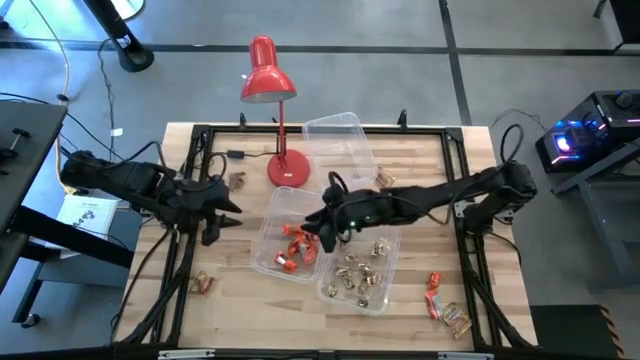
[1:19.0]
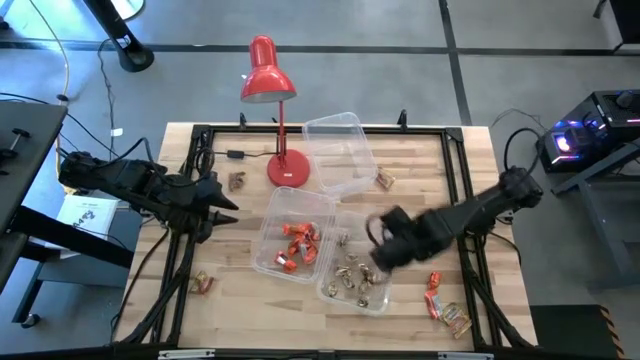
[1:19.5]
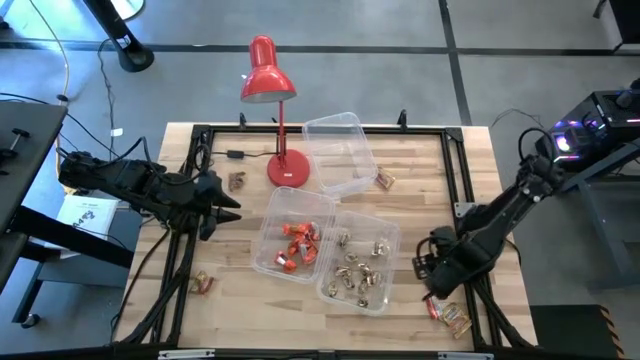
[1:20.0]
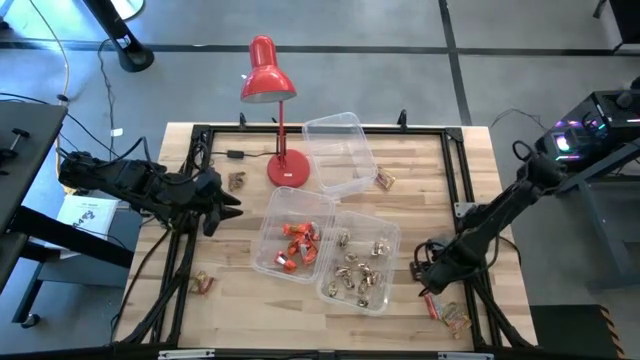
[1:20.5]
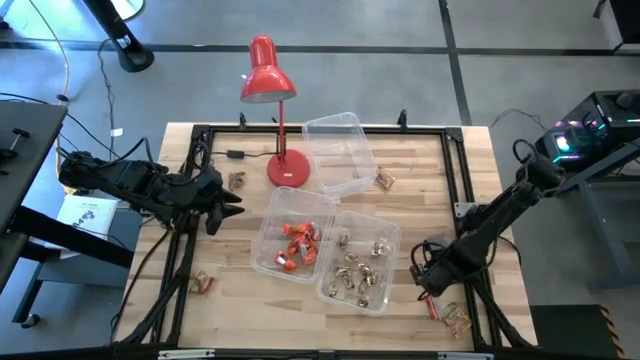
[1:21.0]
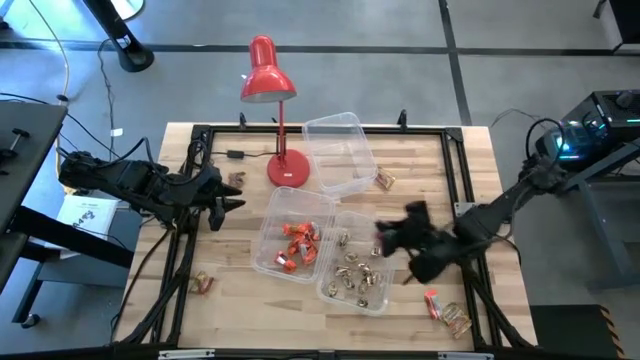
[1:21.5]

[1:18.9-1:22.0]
Task: Sort candy
Put the orange chocolate bar into the bottom left transparent bin

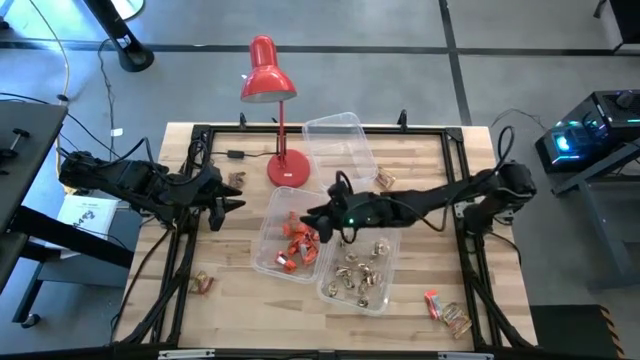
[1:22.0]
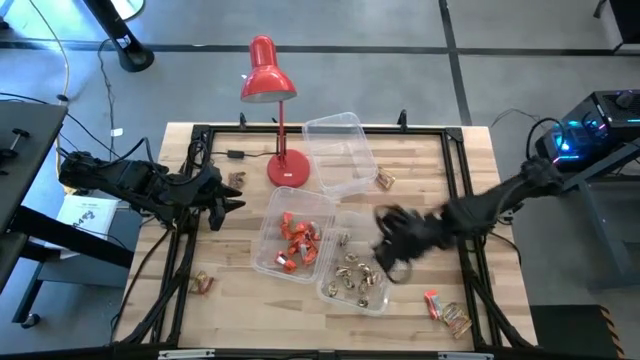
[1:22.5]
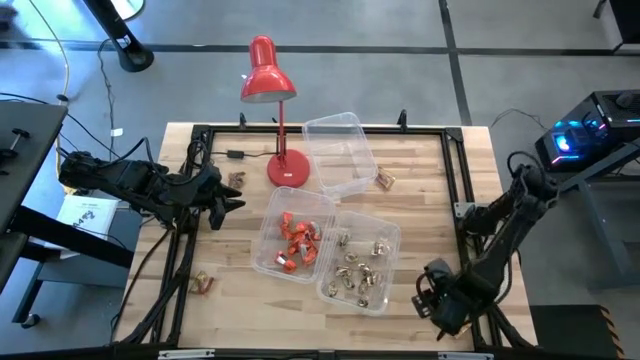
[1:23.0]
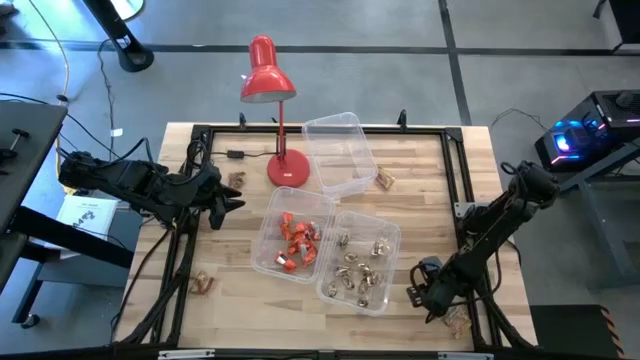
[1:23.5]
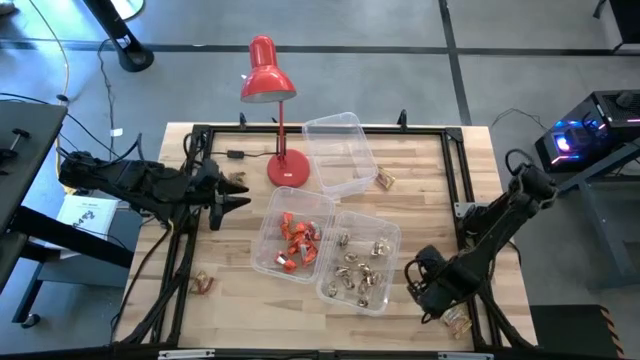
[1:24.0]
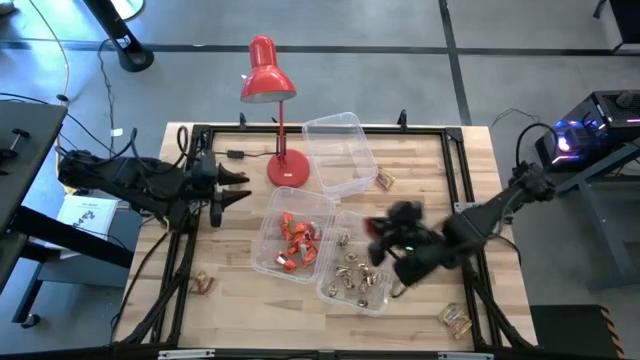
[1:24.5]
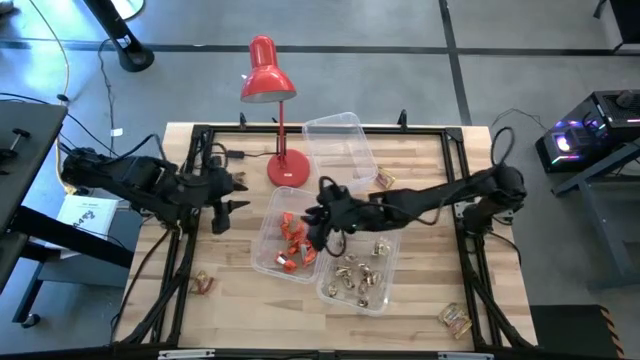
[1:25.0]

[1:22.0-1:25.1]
Put the orange chocolate bar into the bottom left transparent bin

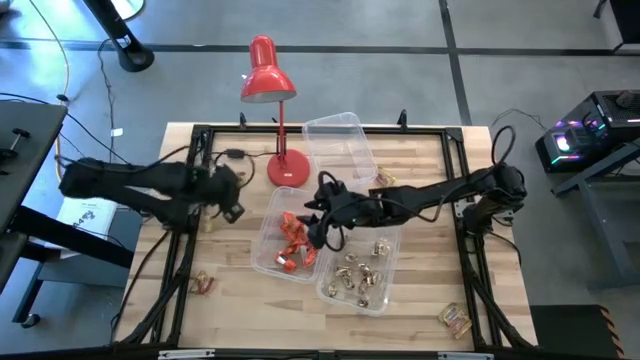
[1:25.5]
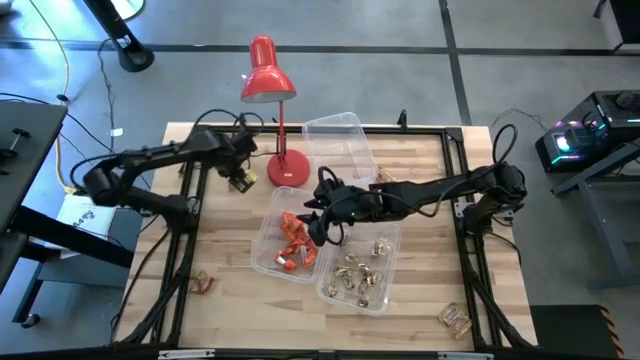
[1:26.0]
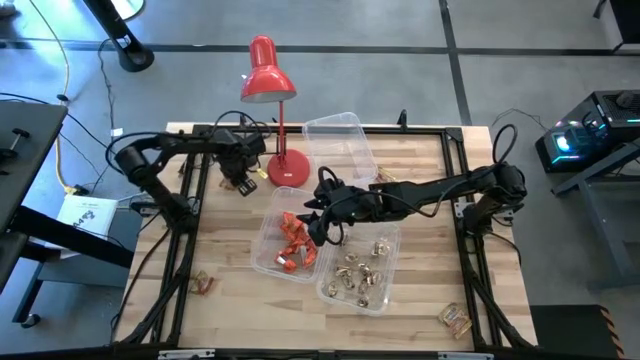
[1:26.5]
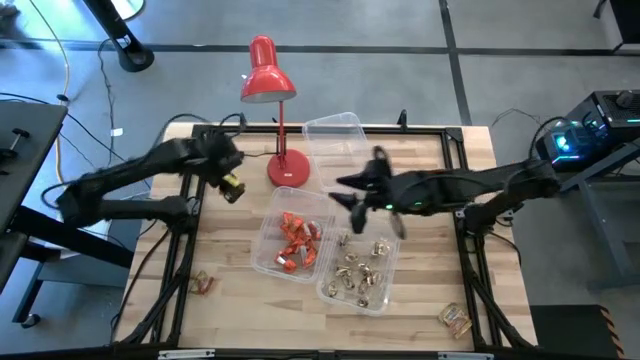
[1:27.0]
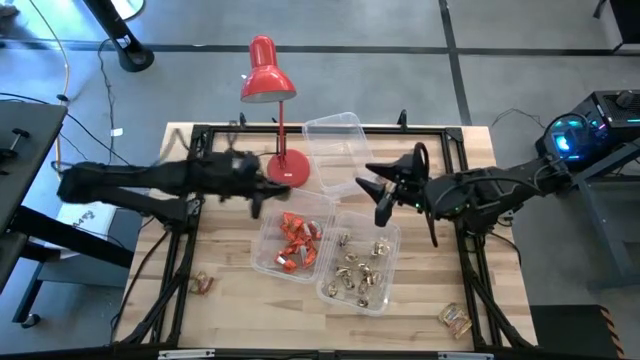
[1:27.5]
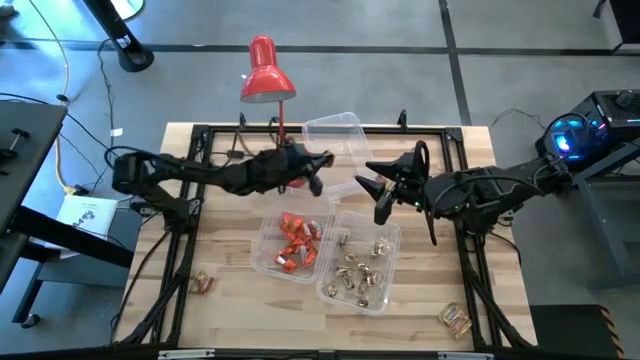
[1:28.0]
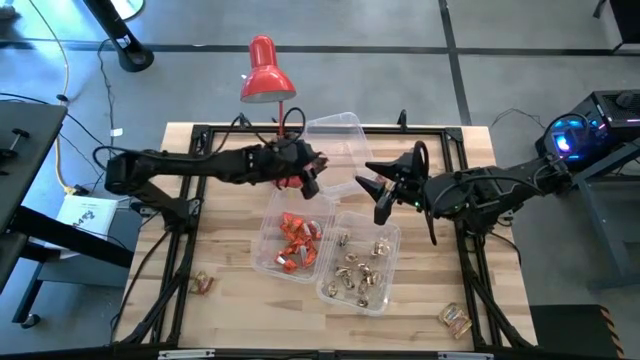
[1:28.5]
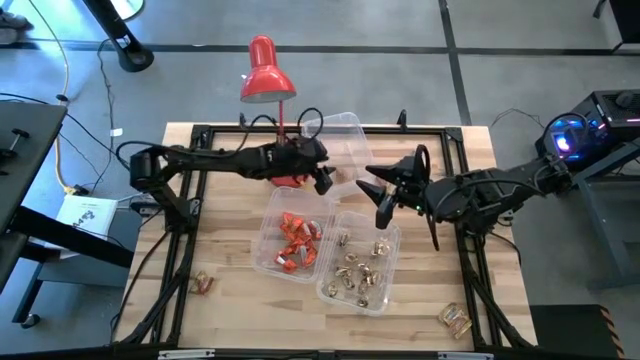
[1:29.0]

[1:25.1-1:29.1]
Put the gold chocolate pack into the top transparent bin

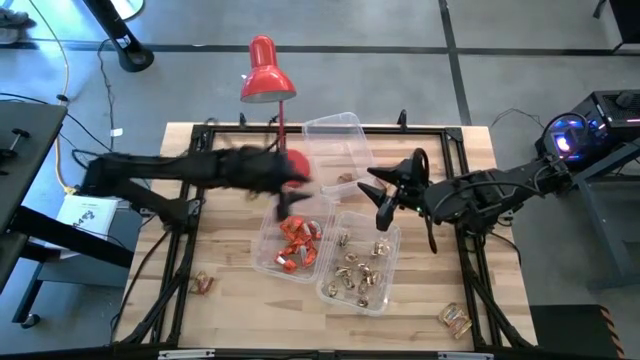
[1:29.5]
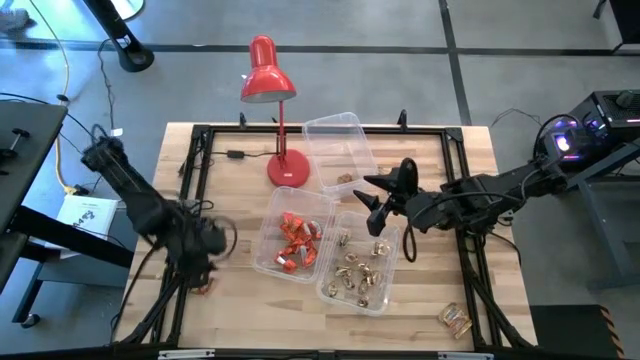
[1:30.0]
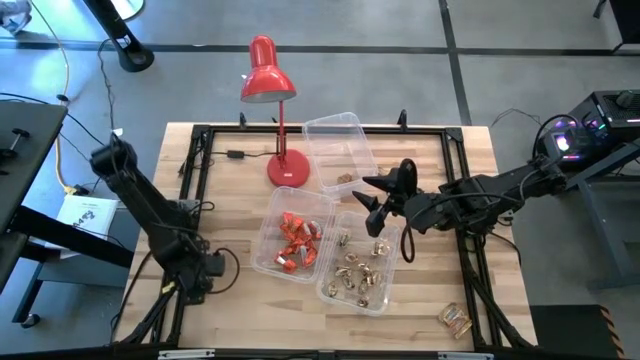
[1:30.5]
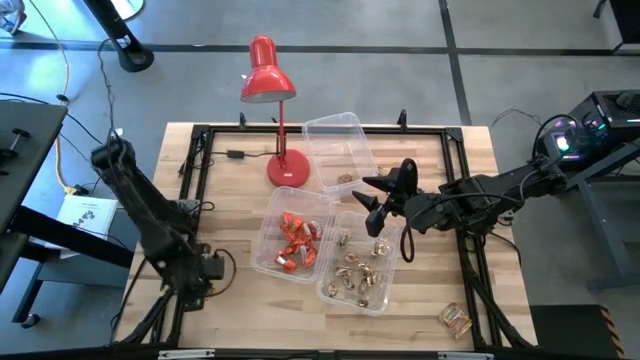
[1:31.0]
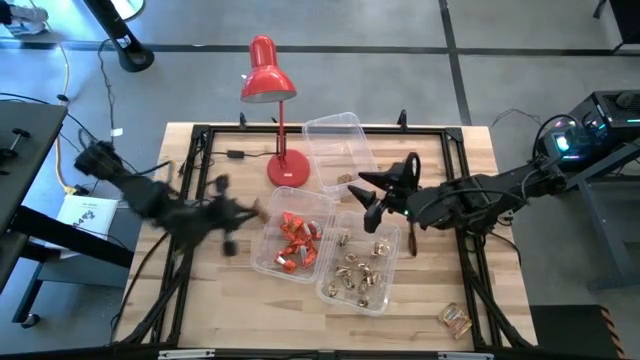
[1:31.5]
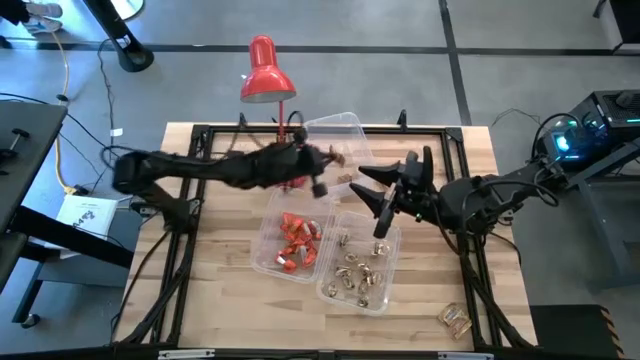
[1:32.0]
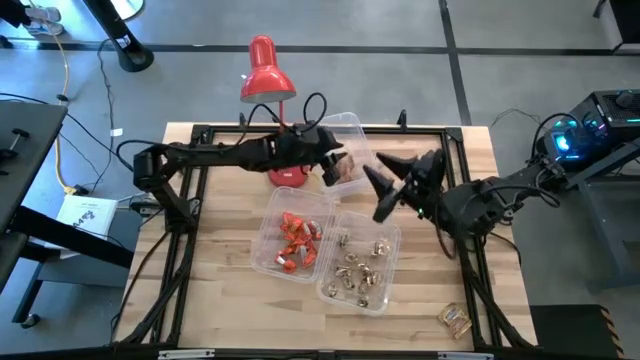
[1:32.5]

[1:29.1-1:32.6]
Put the gold chocolate pack into the top transparent bin

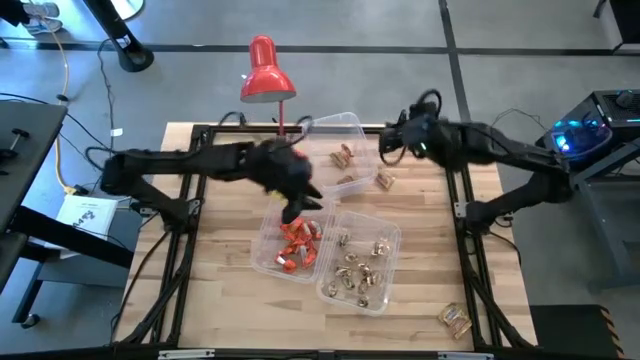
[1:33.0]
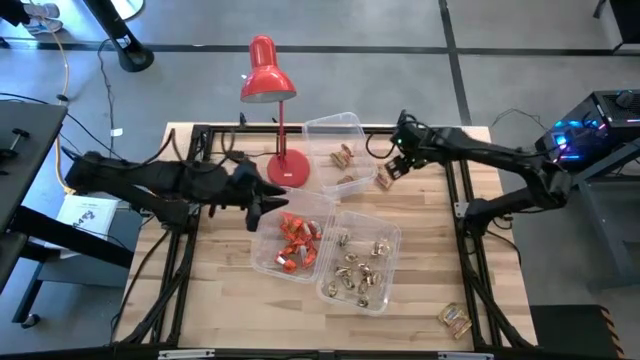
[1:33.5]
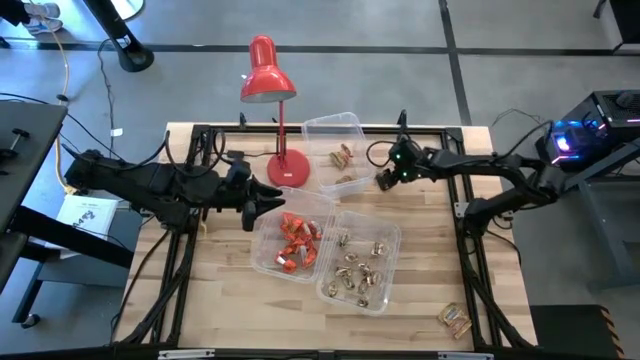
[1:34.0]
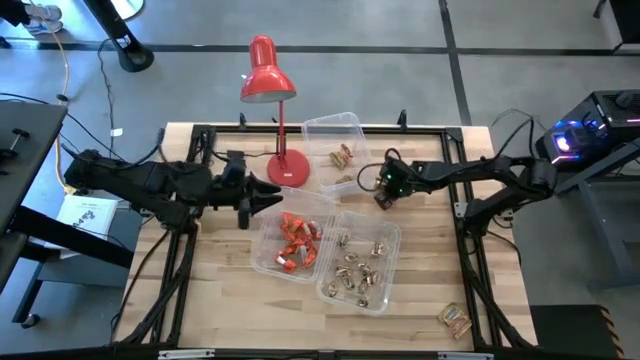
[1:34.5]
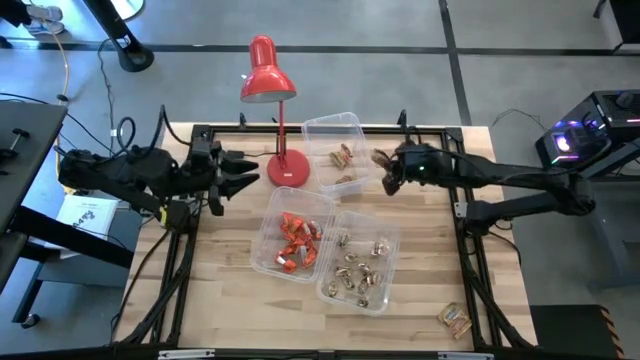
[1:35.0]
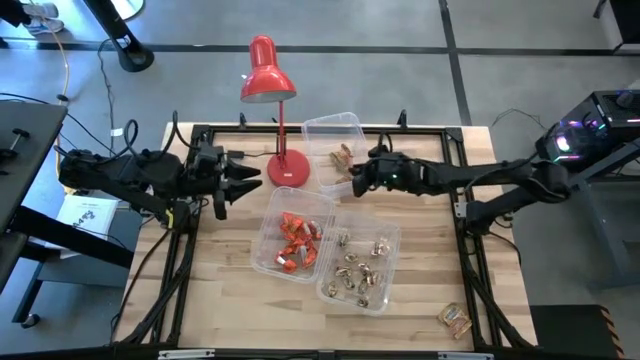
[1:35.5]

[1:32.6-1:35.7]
Put the gold chocolate pack into the top transparent bin

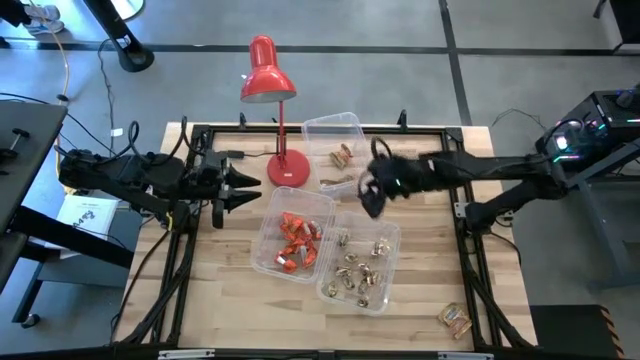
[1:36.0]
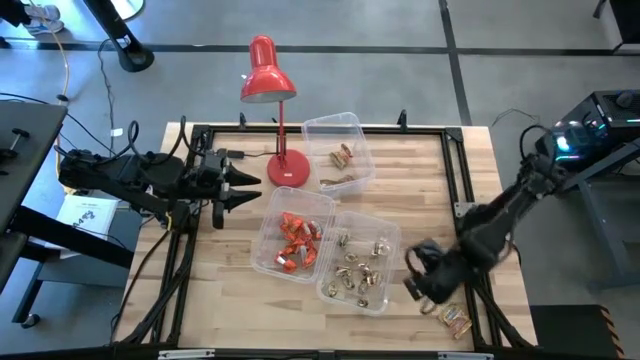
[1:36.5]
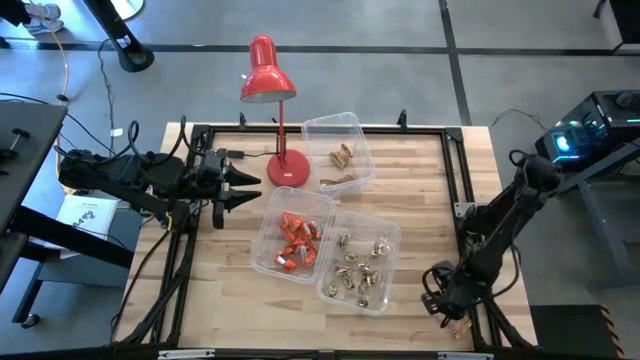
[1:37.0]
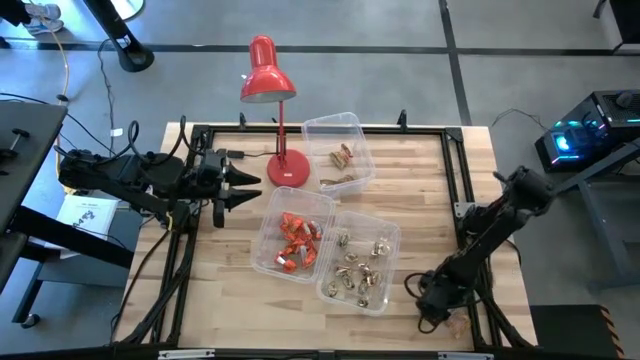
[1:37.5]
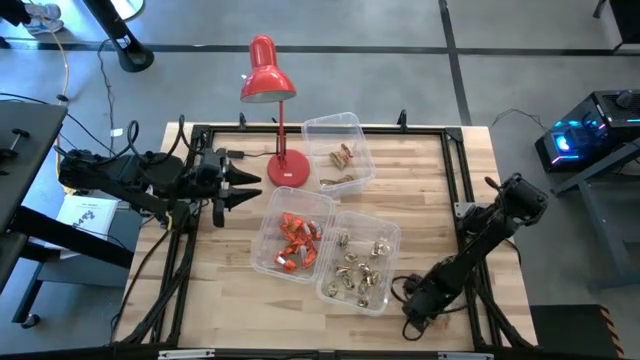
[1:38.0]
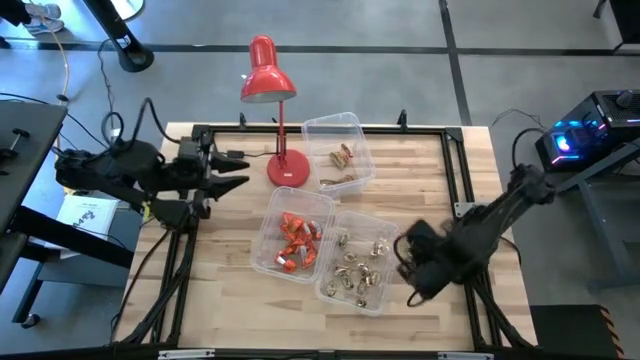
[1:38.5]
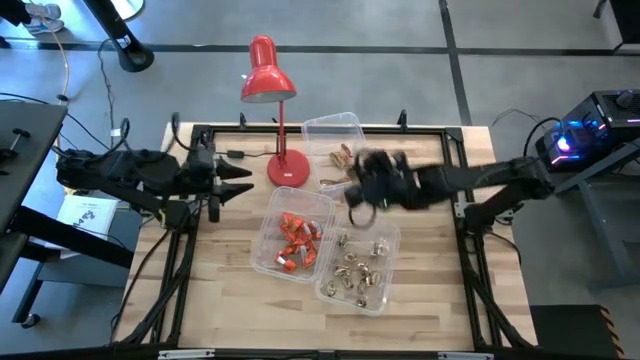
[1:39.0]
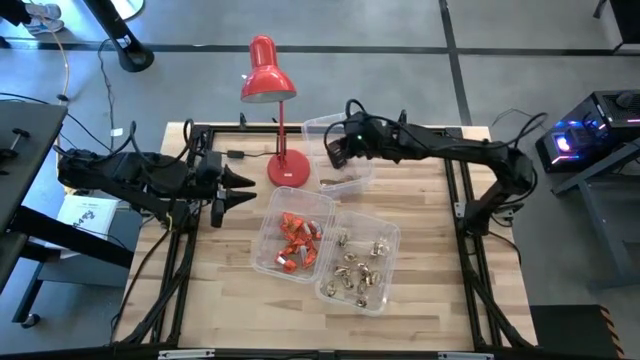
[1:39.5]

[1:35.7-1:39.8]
Put the yellow candy into the top right transparent bin
